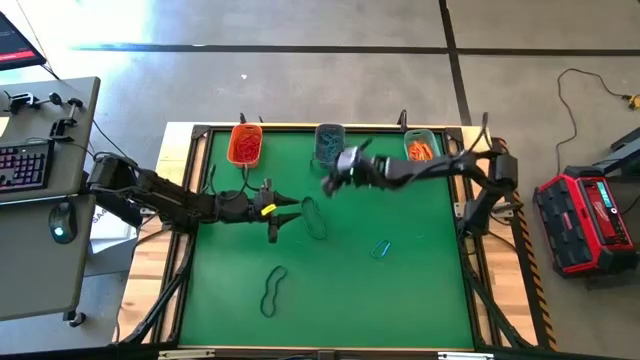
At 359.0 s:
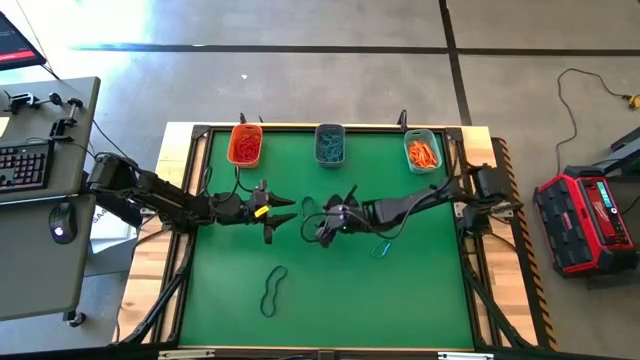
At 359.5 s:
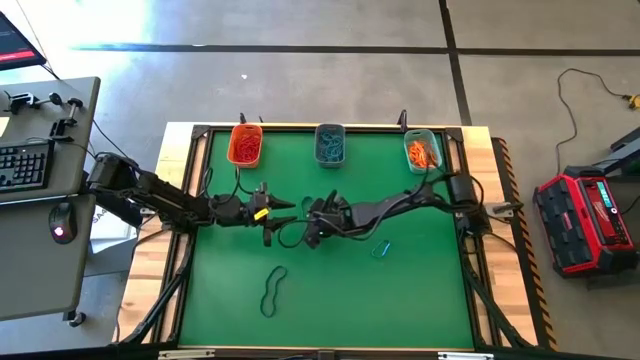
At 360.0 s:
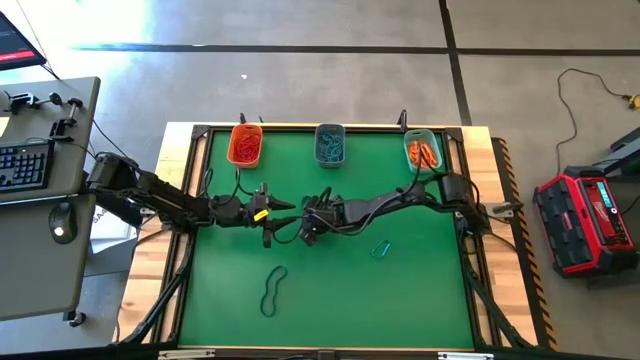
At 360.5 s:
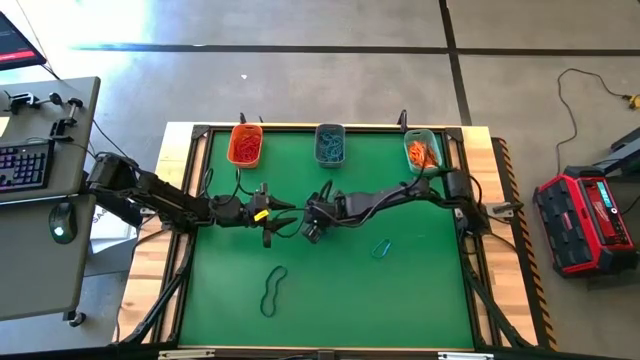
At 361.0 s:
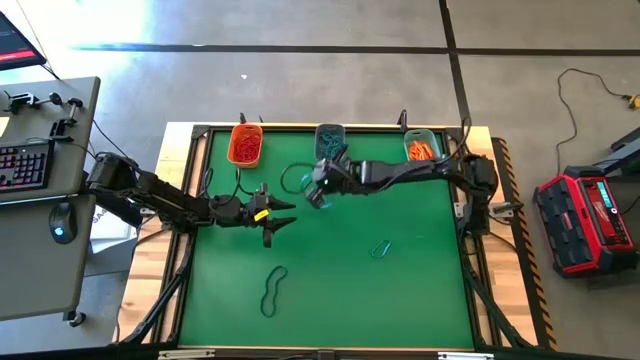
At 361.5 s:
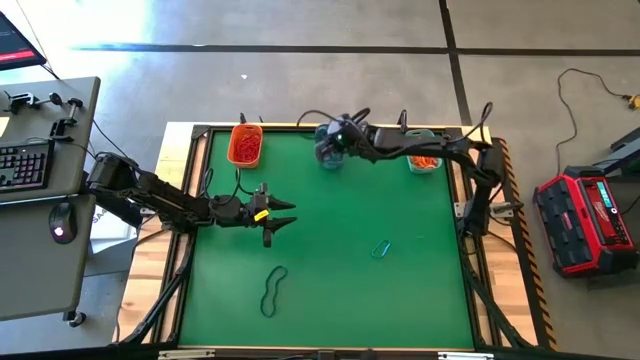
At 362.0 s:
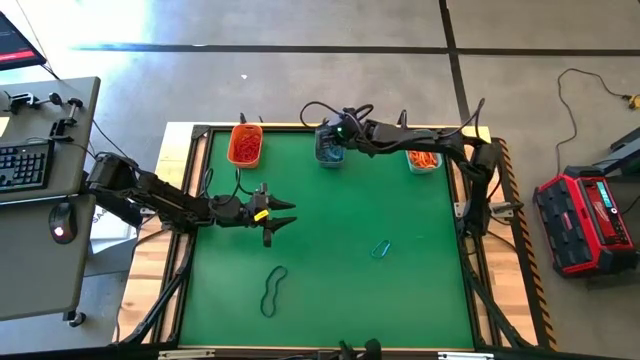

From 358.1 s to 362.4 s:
Task: Sort rubber bands into baskets
Put the blue rubber band into the blue bin

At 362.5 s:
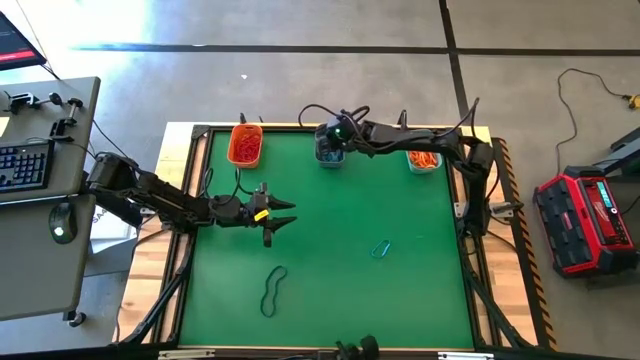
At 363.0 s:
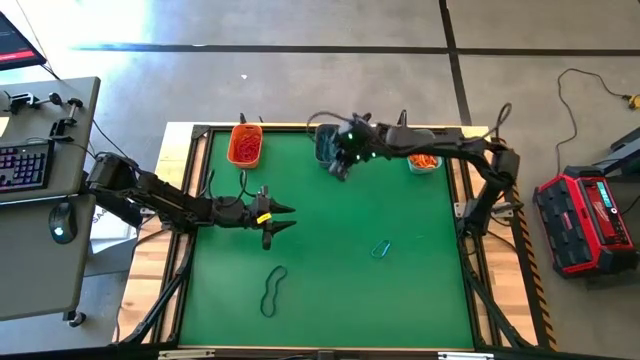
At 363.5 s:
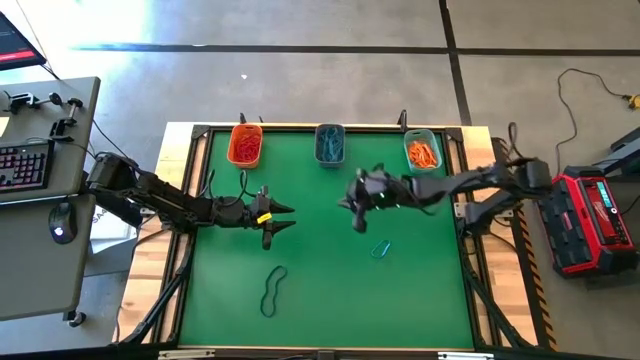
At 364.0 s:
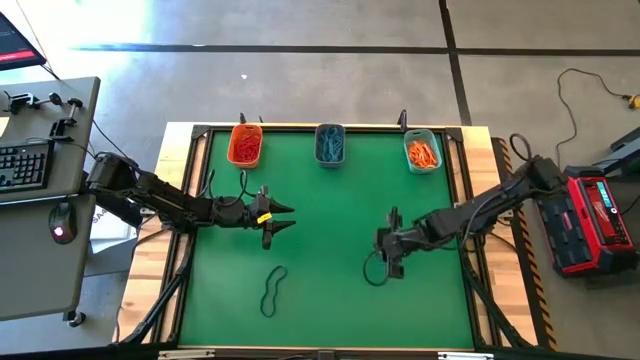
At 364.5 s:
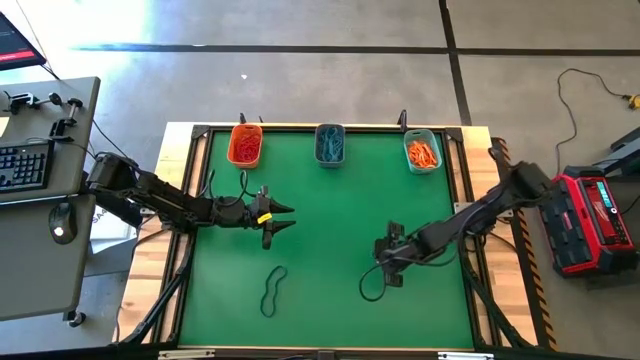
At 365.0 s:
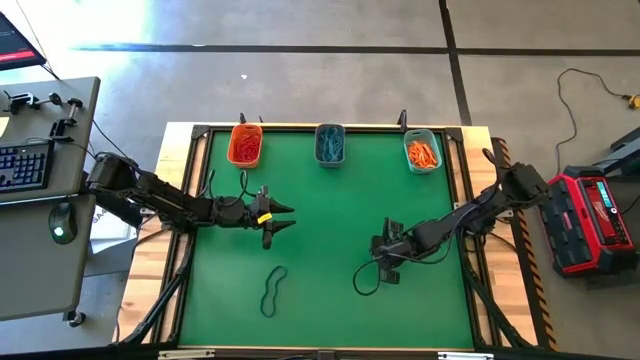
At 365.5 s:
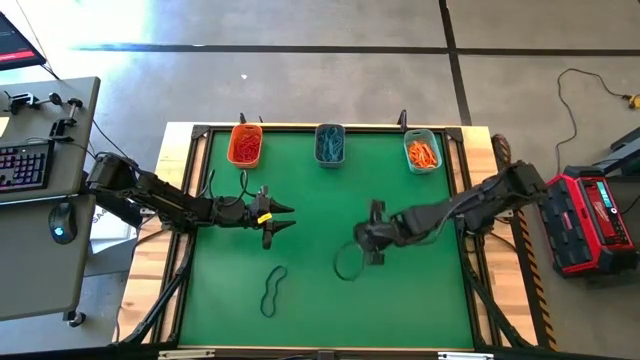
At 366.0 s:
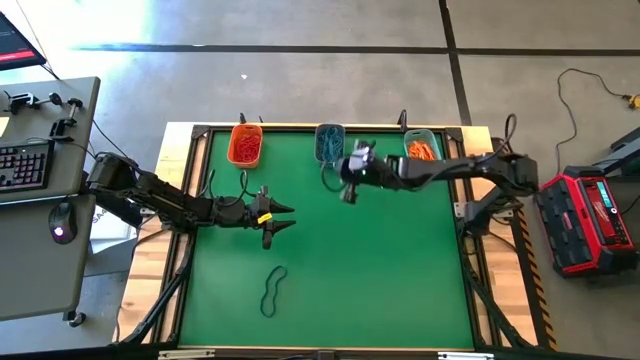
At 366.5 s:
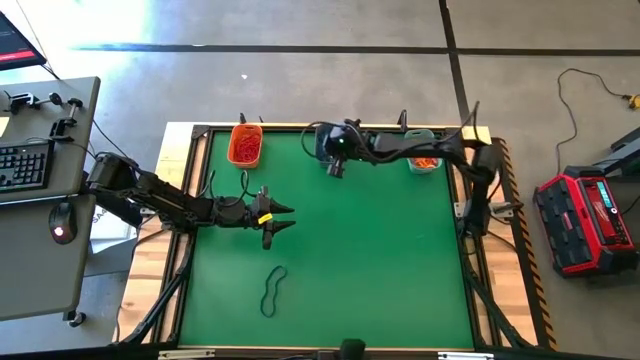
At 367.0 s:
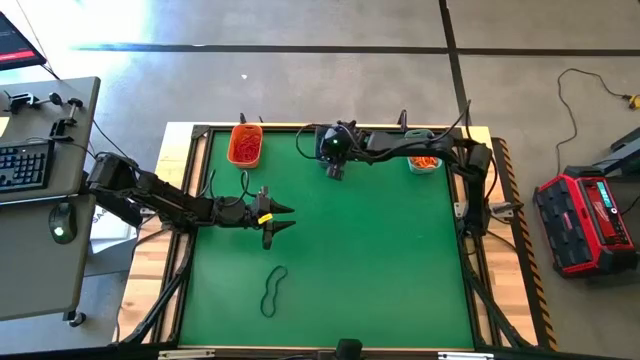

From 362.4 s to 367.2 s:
Put the blue rubber band into the blue bin

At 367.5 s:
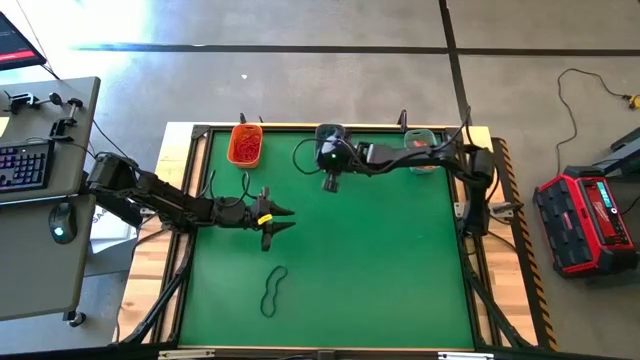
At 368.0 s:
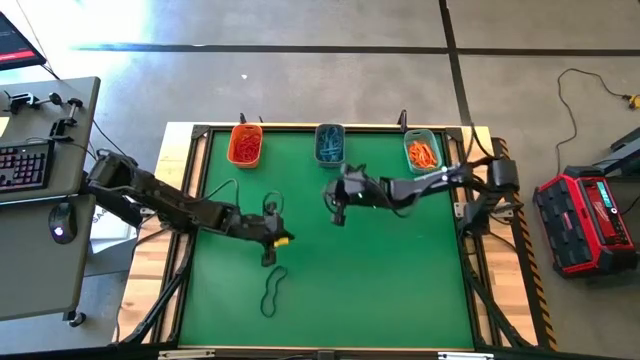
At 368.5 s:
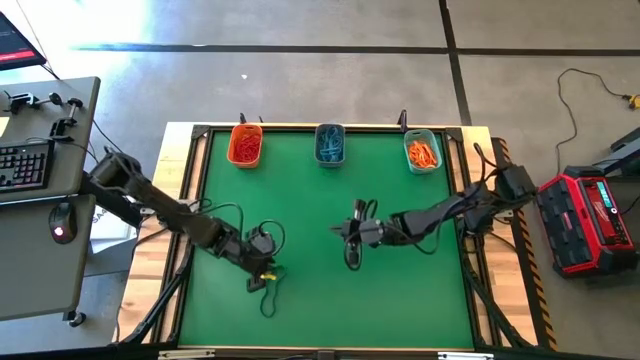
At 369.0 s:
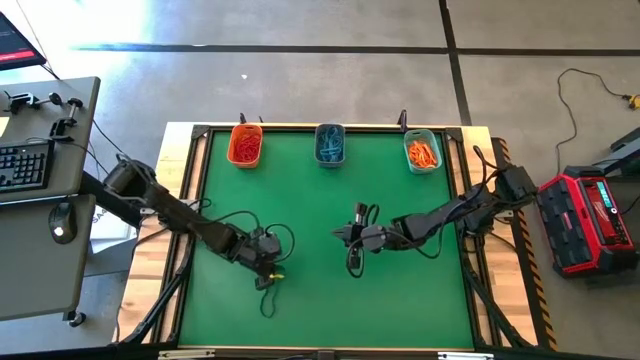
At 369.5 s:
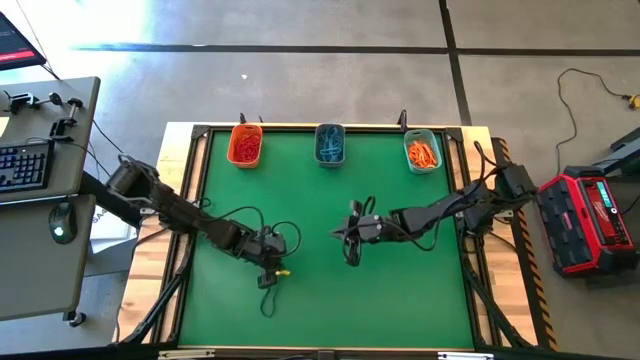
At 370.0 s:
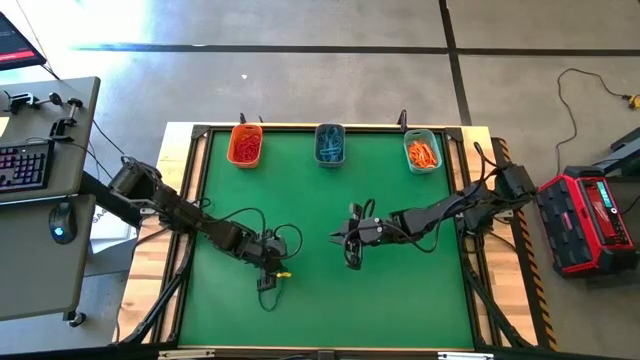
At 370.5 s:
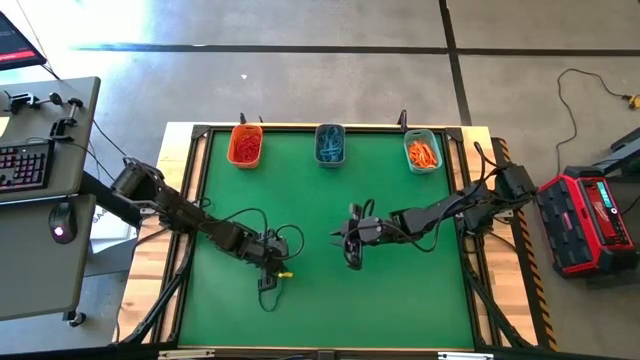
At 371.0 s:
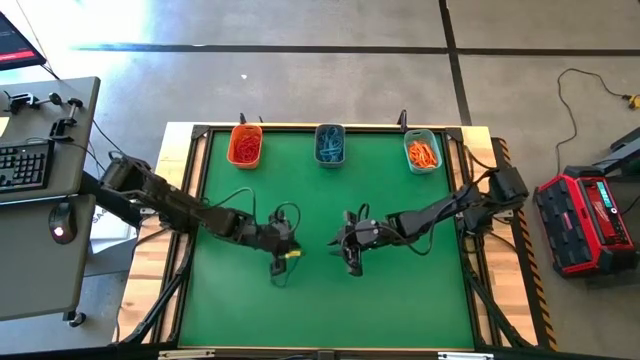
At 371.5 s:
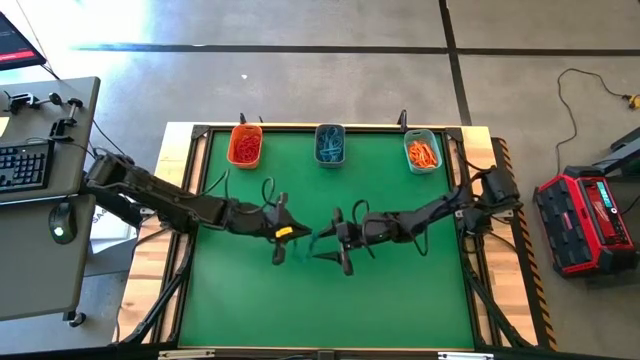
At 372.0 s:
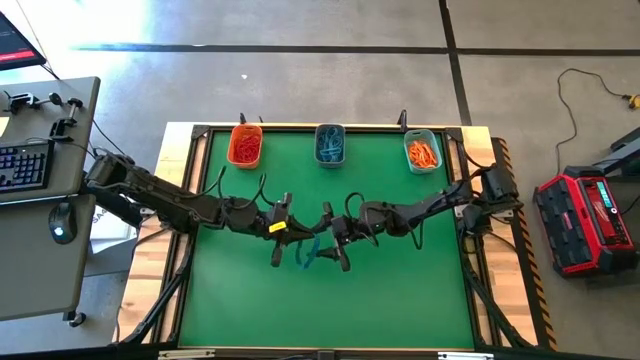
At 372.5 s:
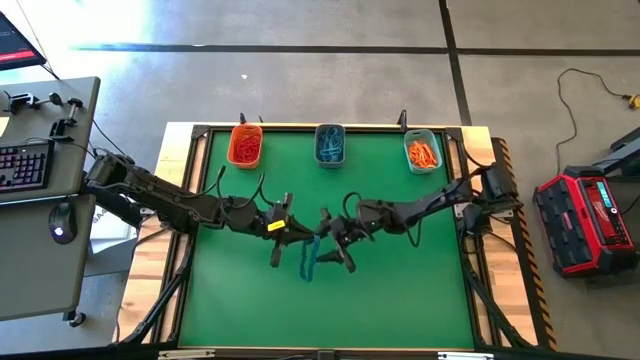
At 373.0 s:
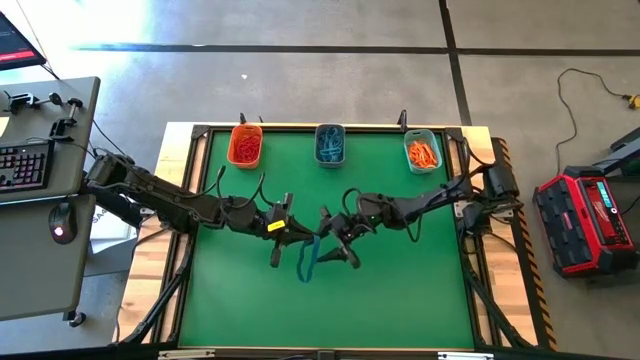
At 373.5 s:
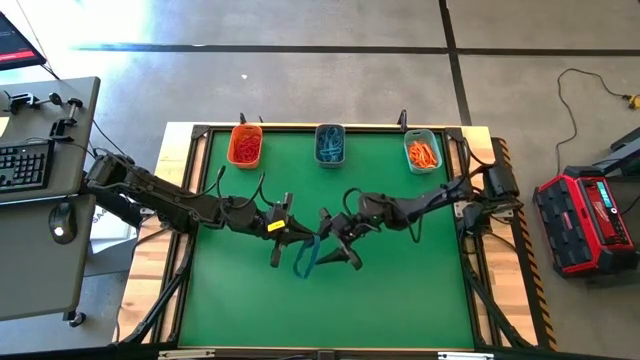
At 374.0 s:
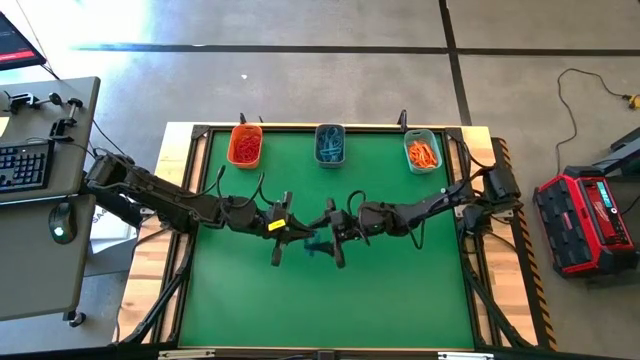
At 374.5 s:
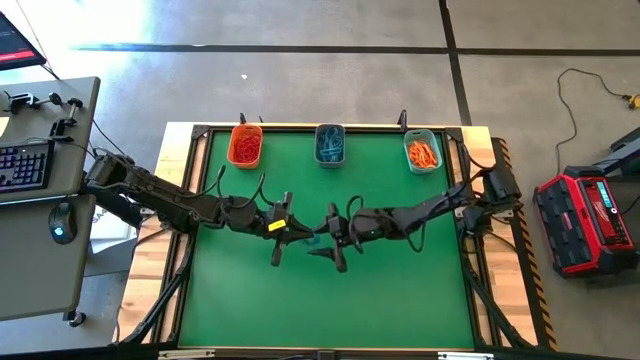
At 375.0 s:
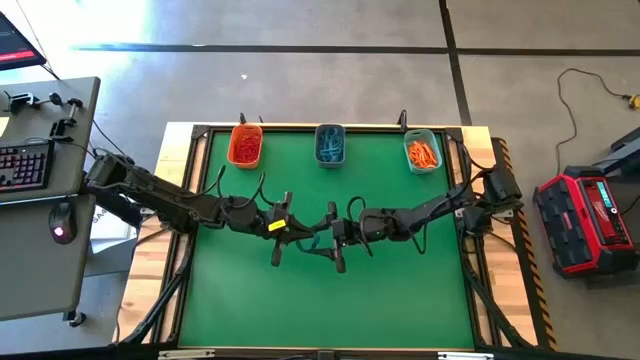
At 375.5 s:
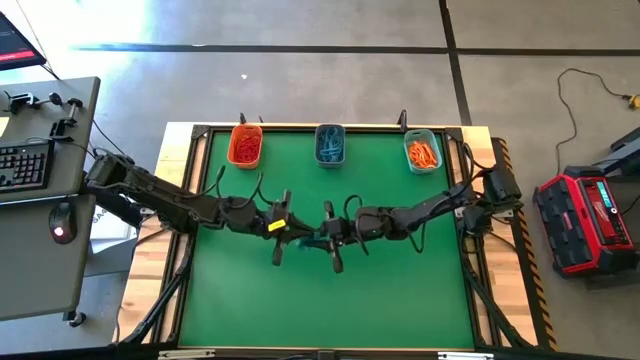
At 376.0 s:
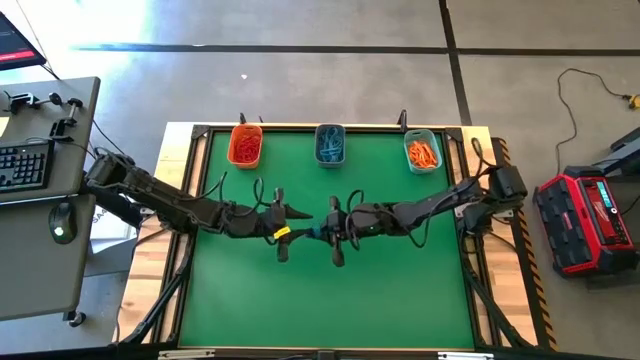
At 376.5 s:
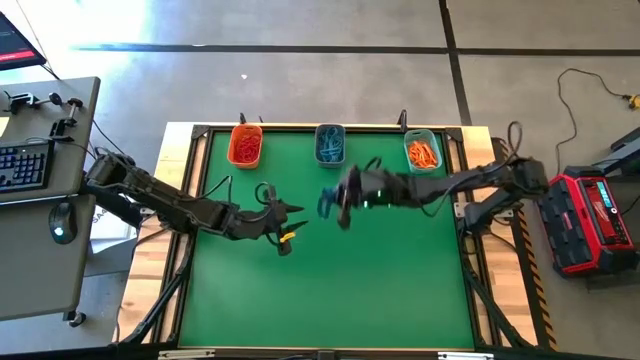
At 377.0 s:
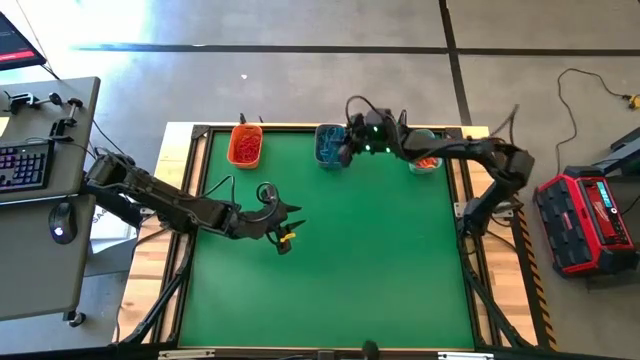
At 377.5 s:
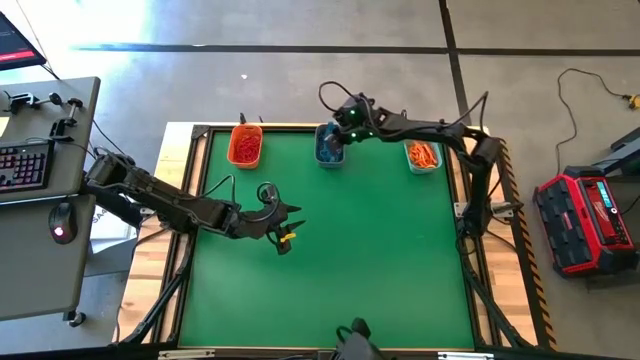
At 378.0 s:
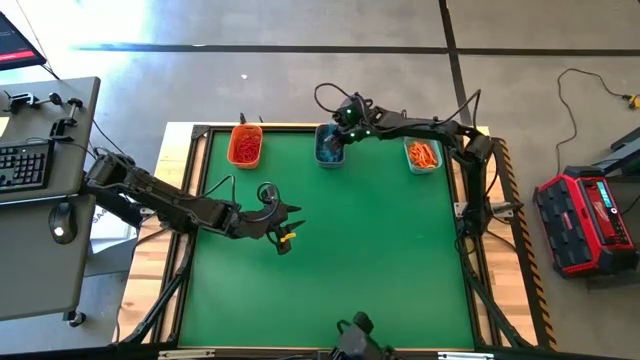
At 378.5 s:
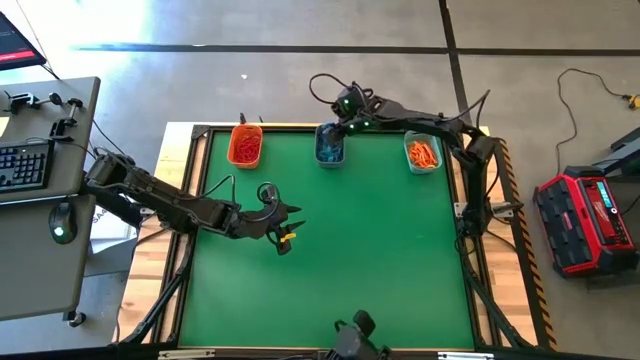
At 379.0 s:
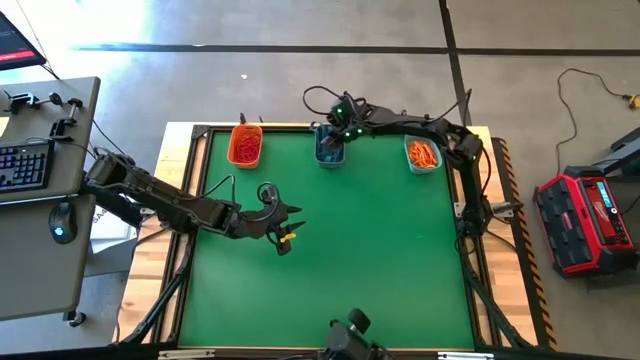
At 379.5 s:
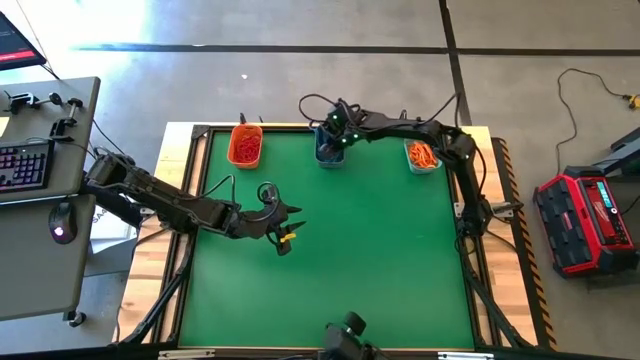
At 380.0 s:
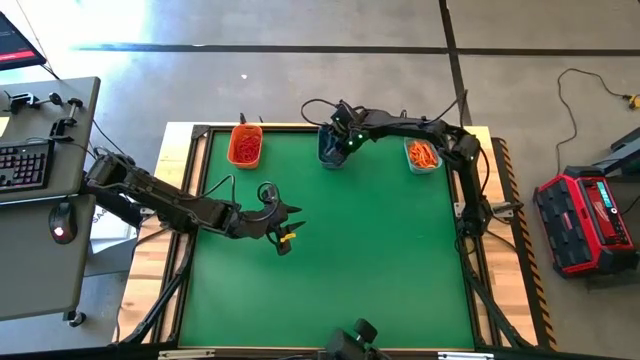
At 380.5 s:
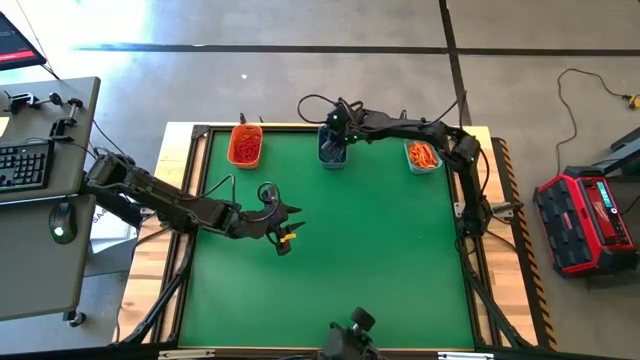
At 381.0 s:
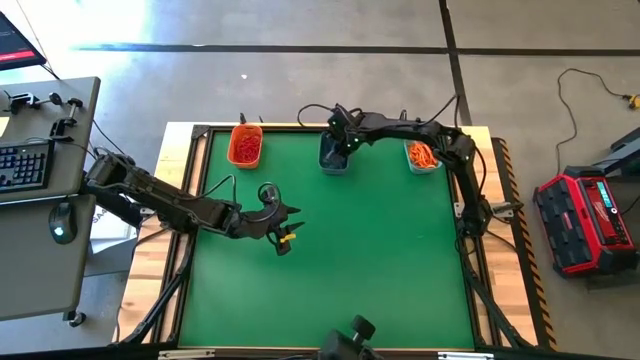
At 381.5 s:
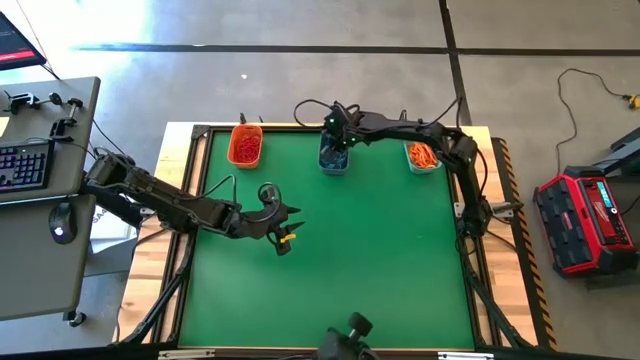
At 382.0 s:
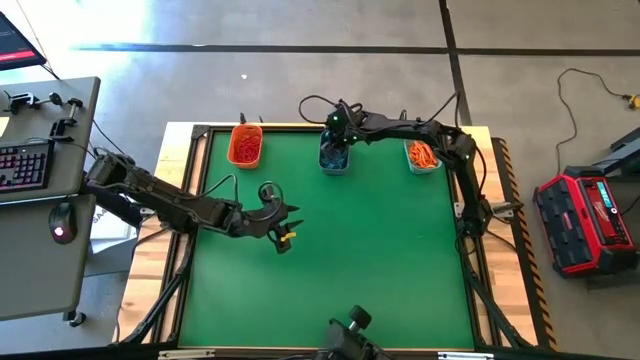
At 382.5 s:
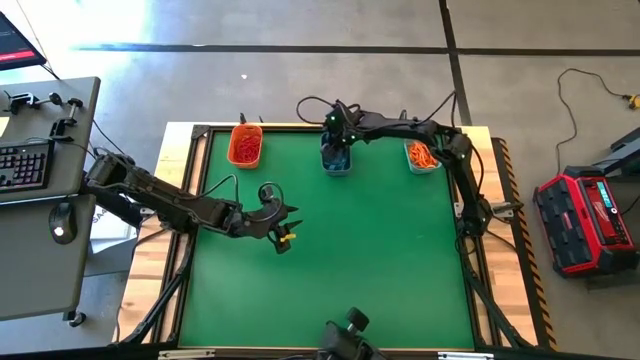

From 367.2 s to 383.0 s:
Put the blue rubber band into the blue bin
